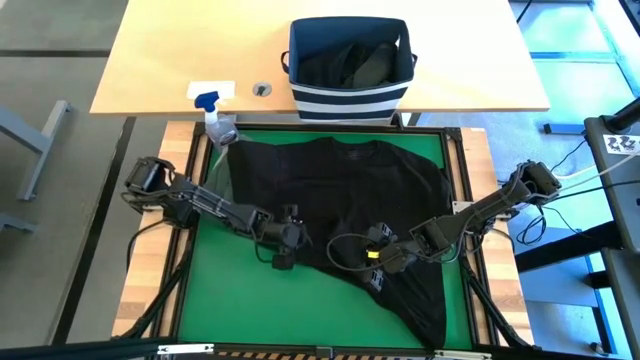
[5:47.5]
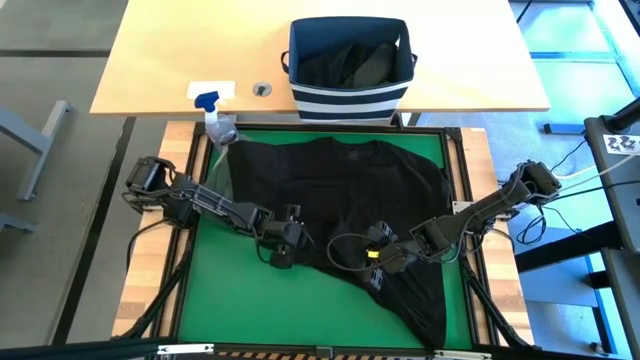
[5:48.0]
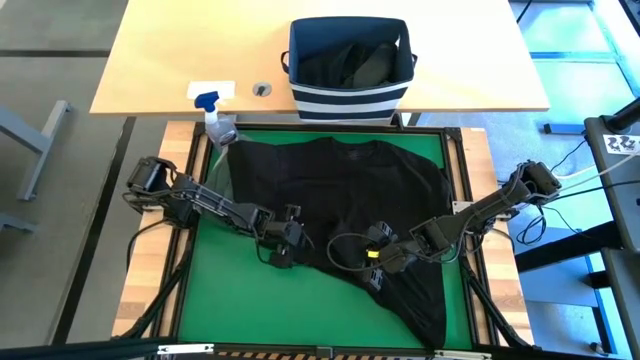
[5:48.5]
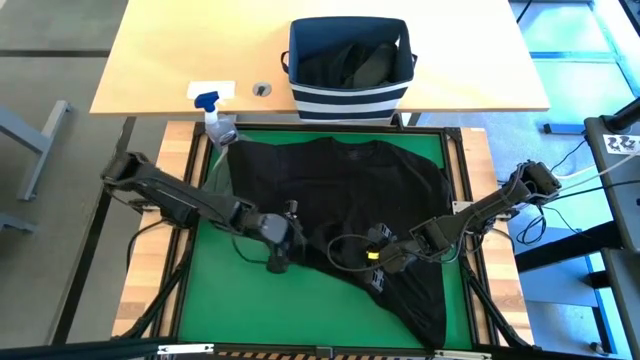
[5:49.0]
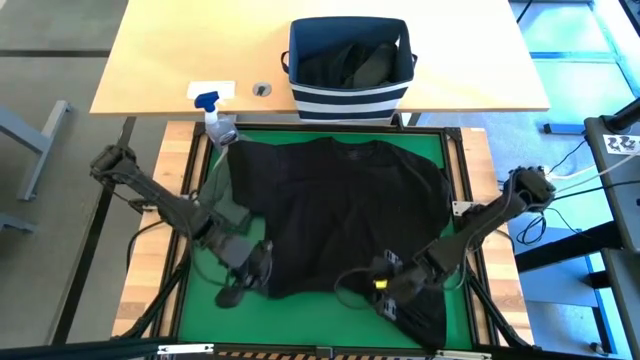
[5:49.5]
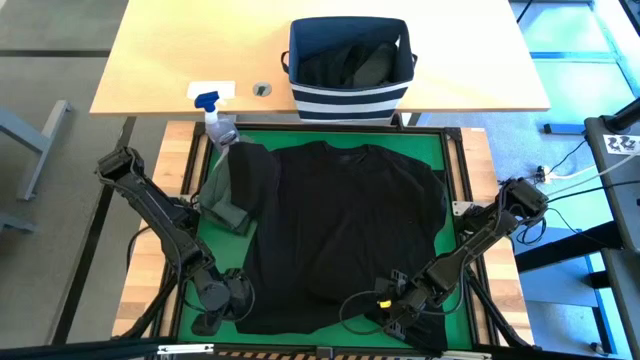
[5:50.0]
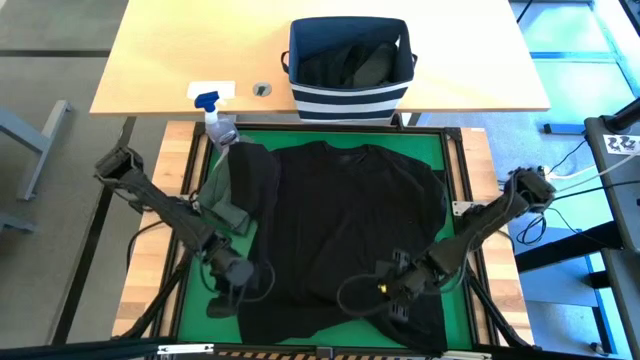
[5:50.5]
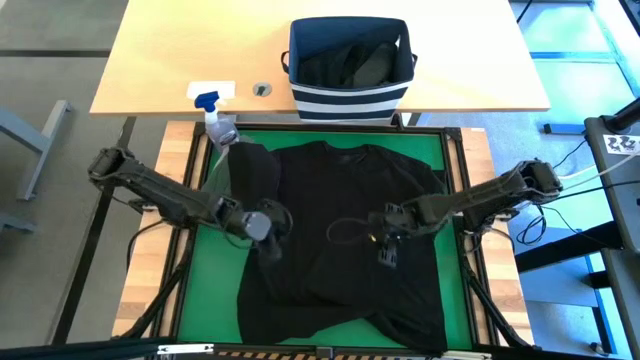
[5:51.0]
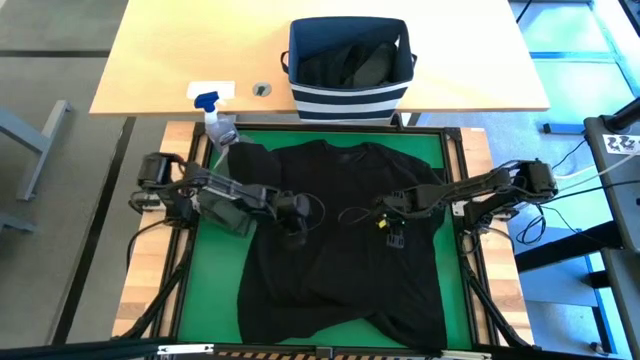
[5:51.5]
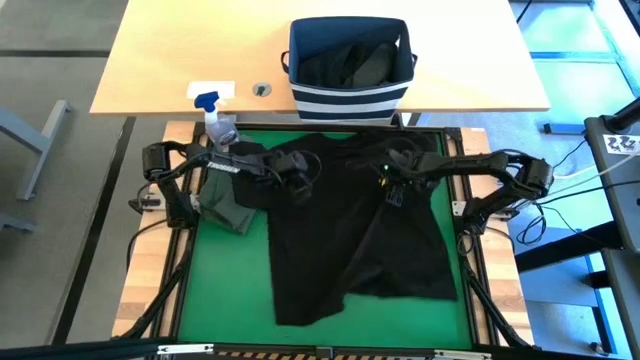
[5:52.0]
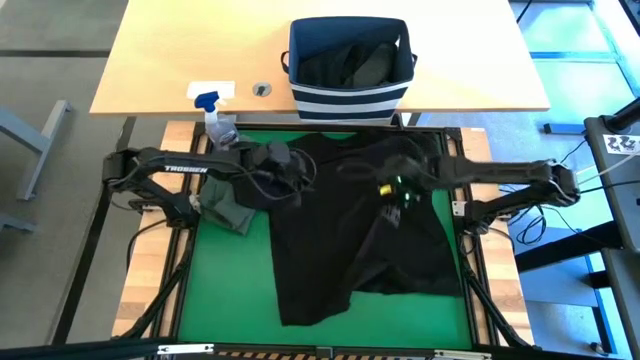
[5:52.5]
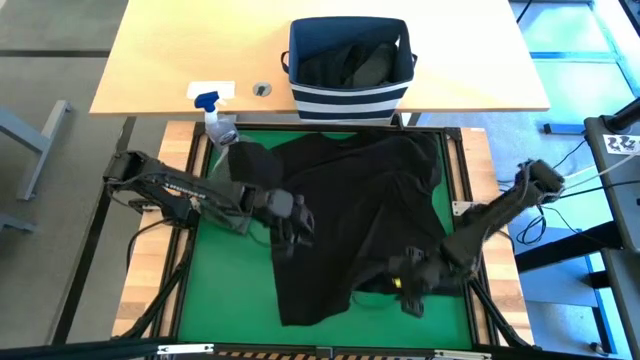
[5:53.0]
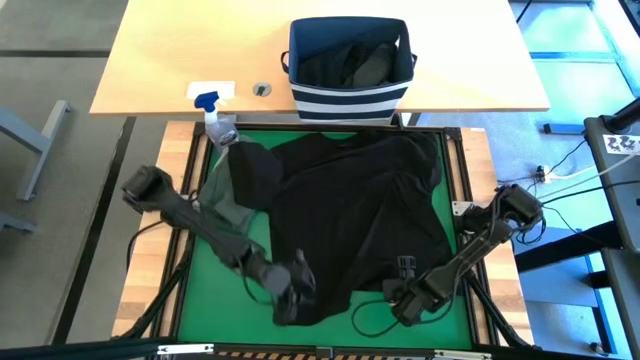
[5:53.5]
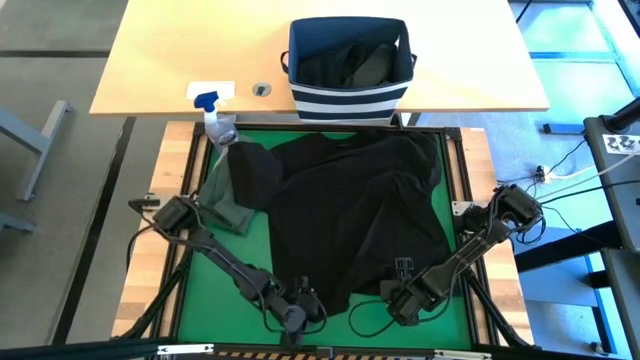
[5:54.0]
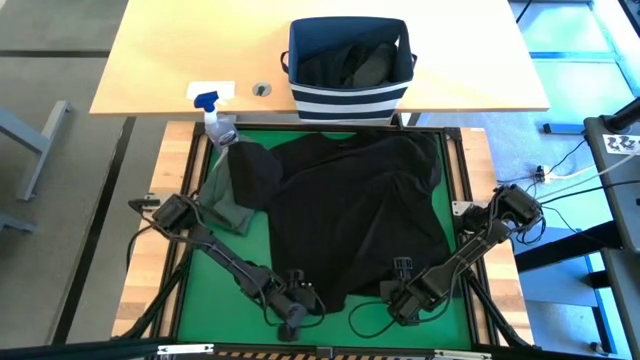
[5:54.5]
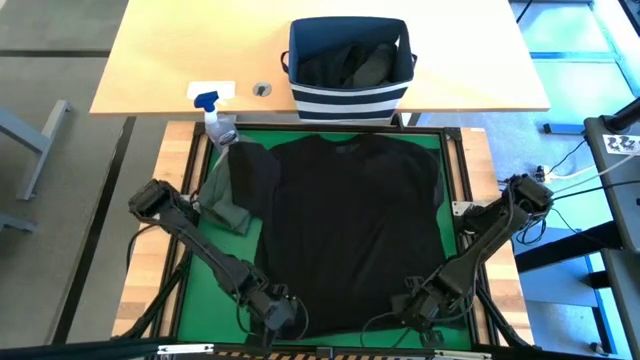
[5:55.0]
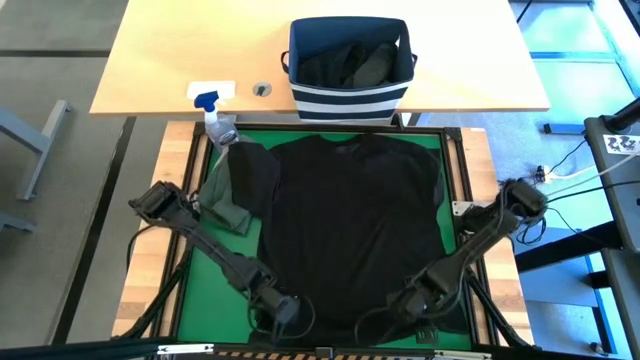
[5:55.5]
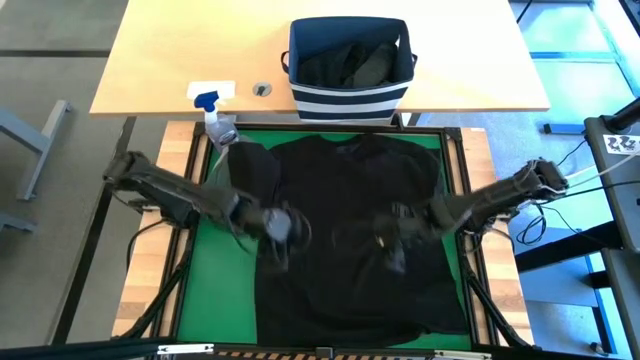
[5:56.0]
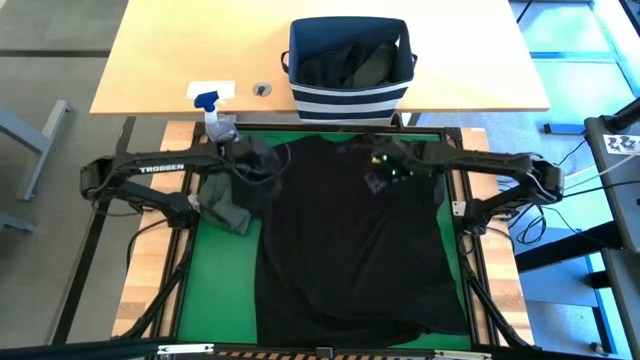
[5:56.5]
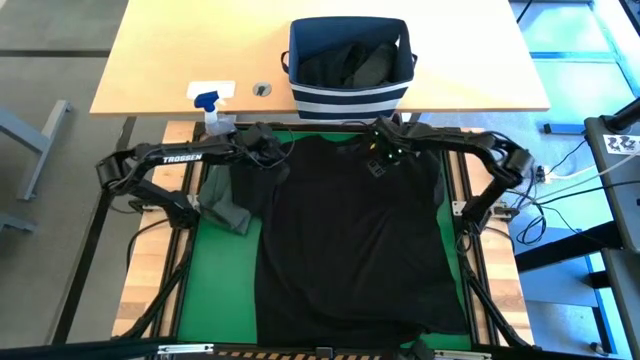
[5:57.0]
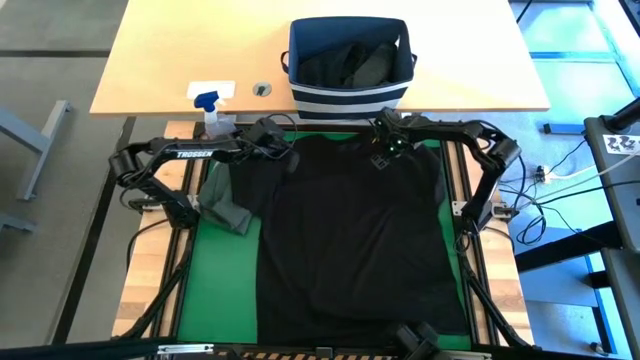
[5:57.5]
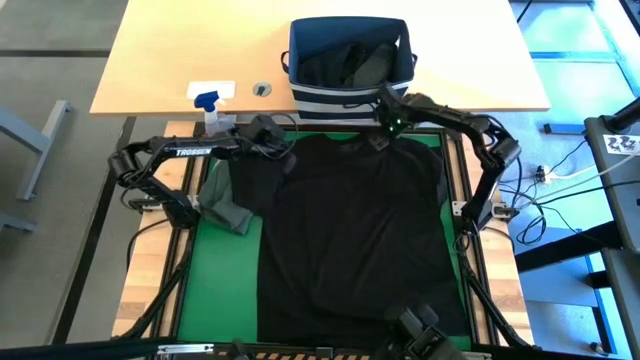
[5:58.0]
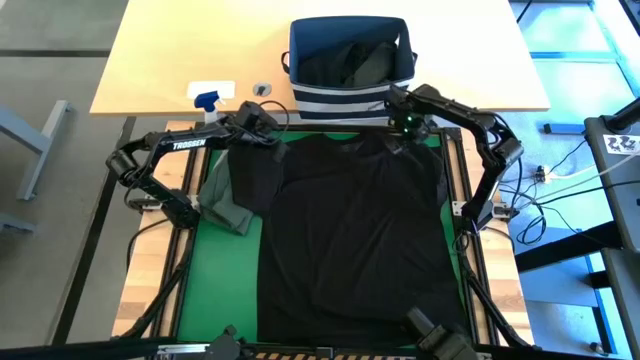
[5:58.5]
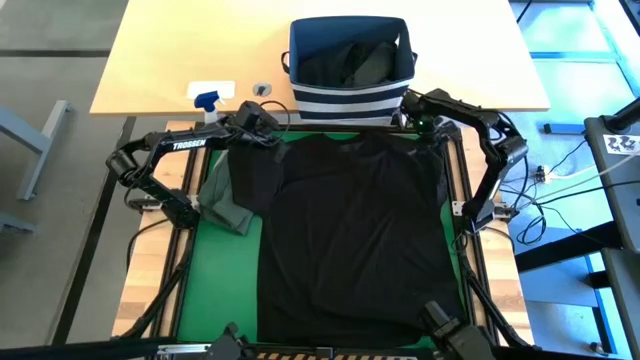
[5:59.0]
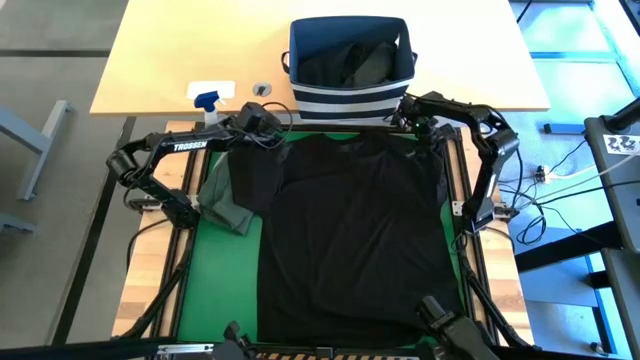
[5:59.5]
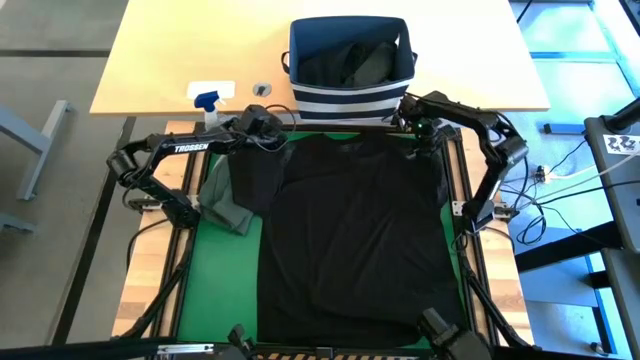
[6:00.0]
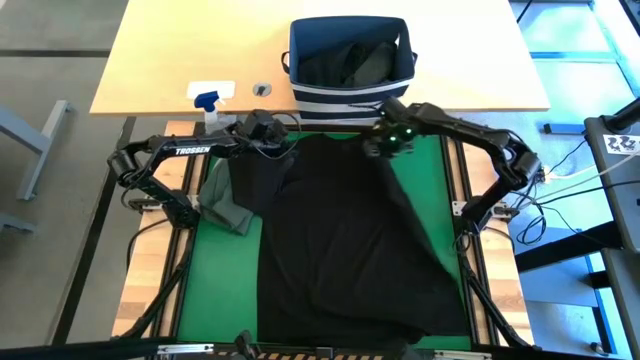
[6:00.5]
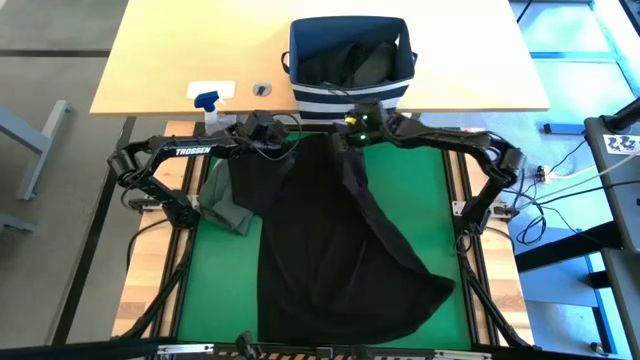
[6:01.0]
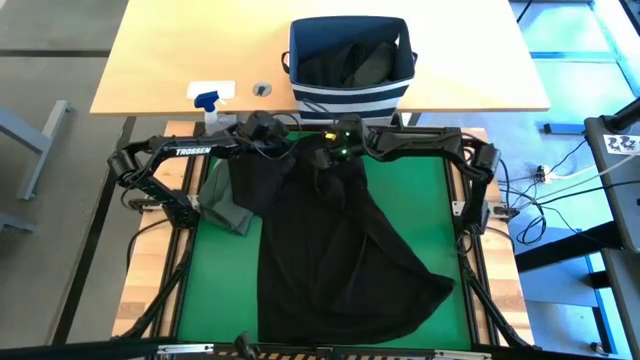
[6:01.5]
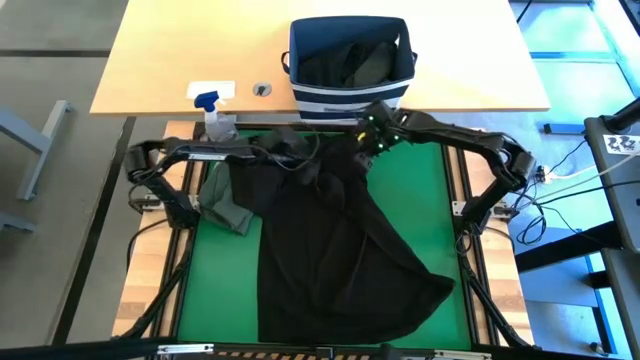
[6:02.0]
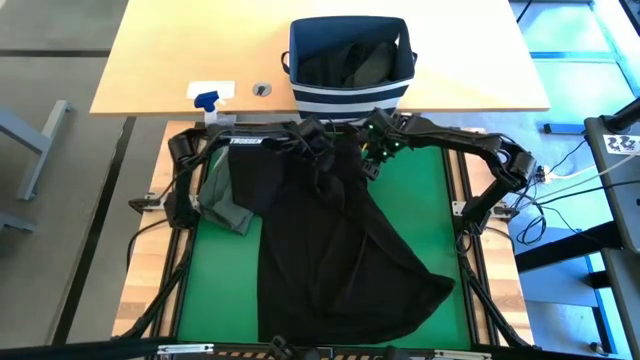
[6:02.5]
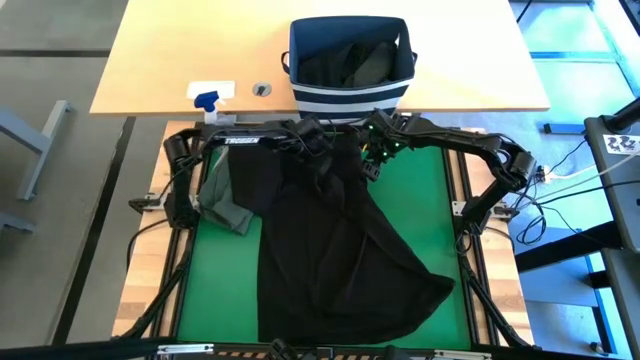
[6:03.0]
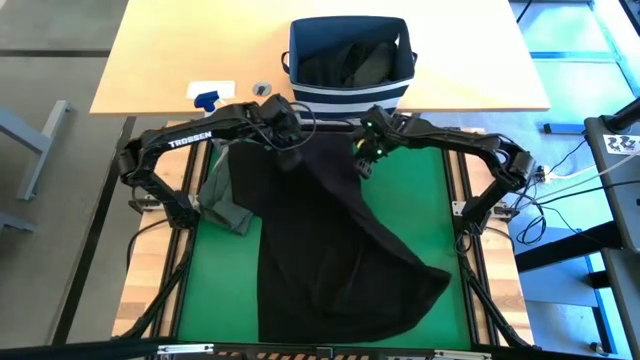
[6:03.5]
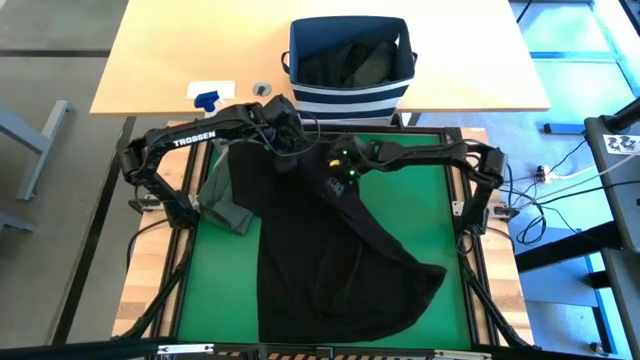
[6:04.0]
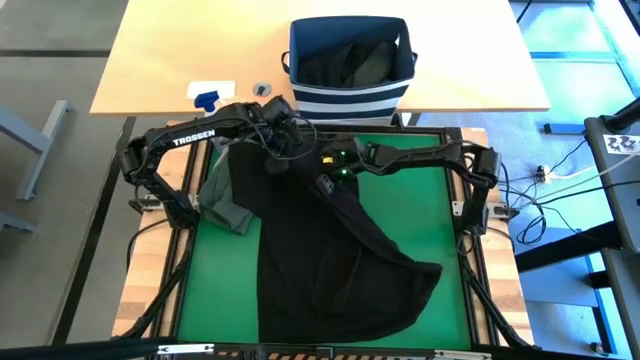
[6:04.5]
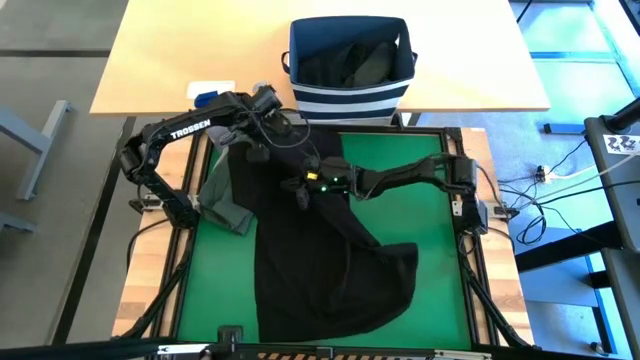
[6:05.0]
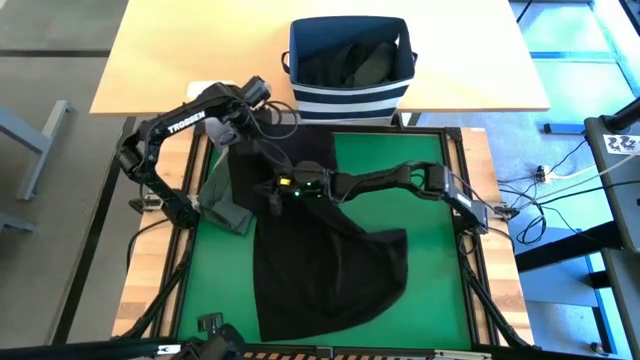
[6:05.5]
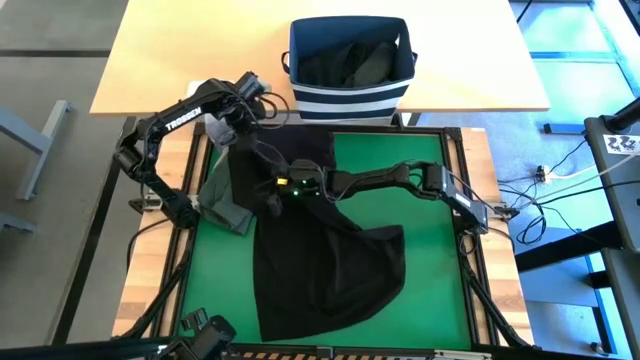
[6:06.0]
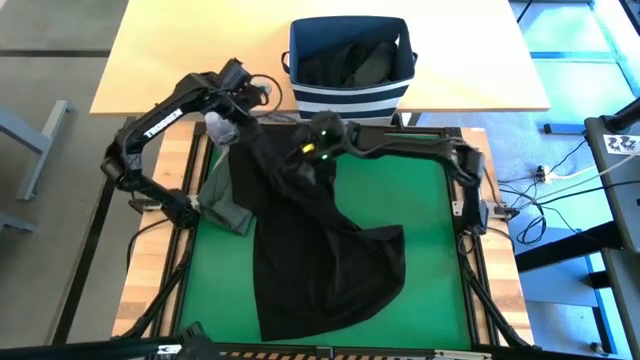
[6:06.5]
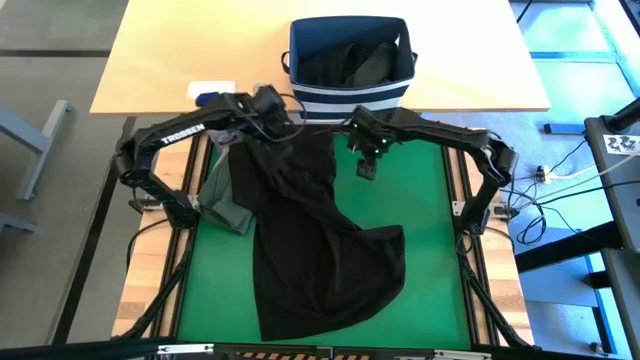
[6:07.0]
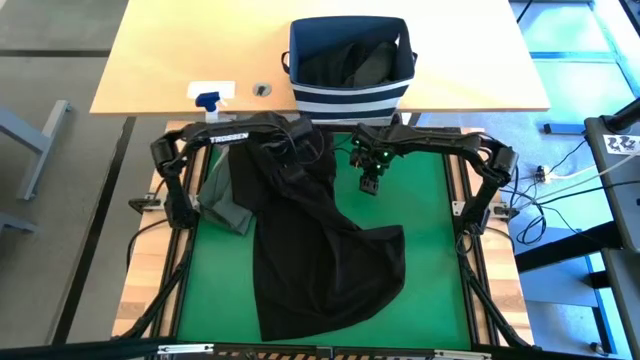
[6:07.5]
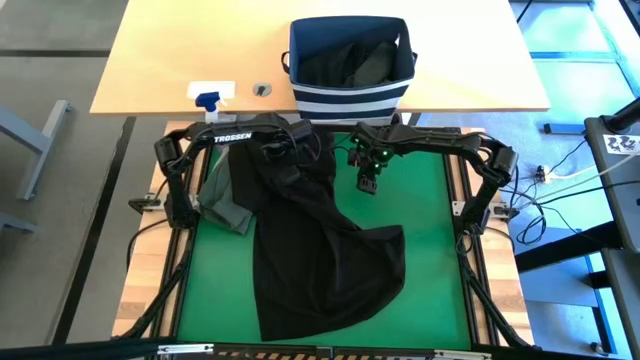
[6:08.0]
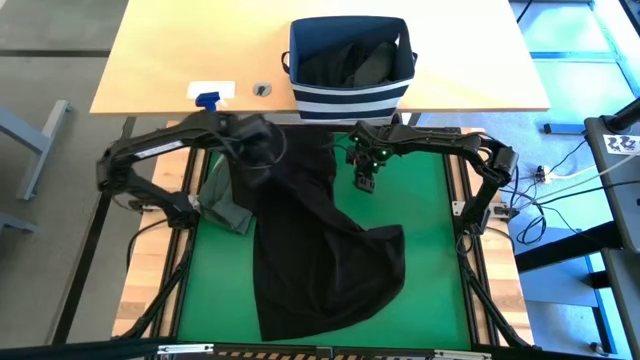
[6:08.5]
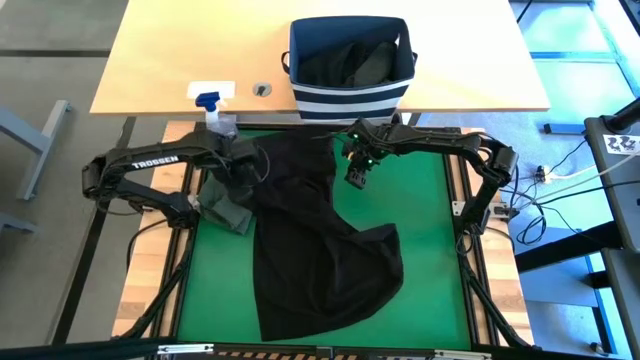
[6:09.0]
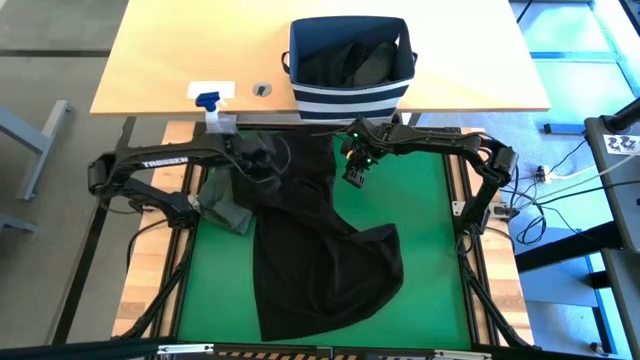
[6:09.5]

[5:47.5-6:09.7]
Task: Fold Laundry from Bin
Fold the black shirt
